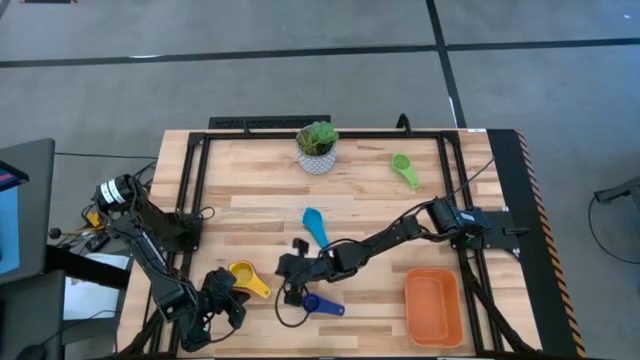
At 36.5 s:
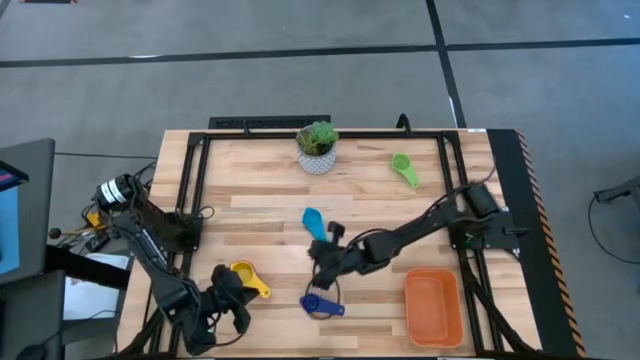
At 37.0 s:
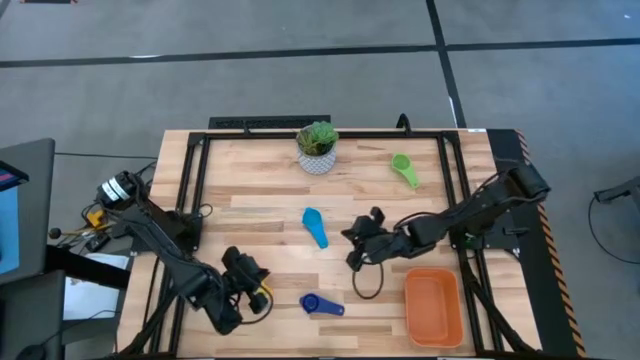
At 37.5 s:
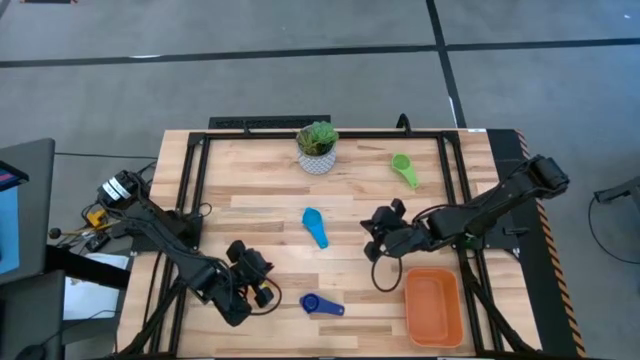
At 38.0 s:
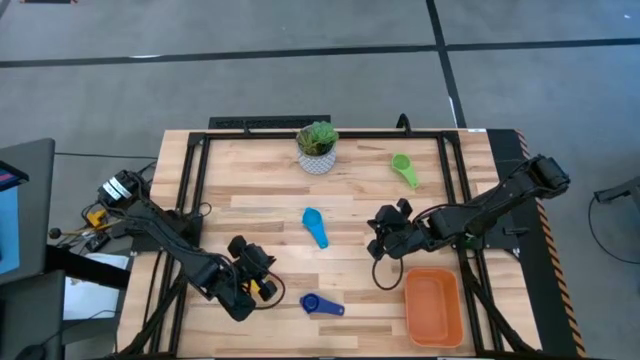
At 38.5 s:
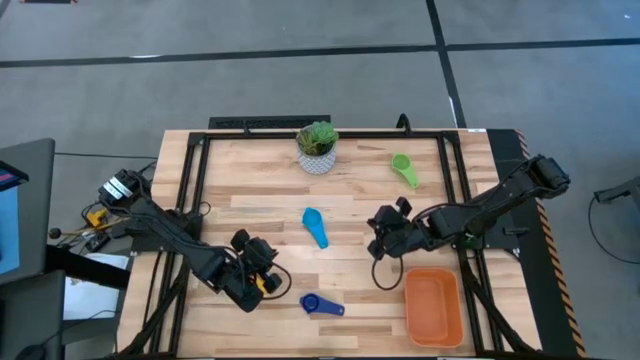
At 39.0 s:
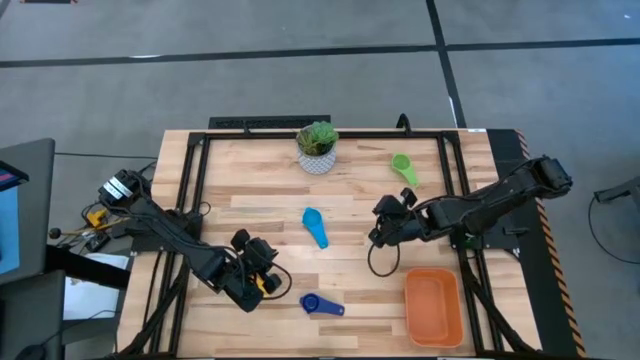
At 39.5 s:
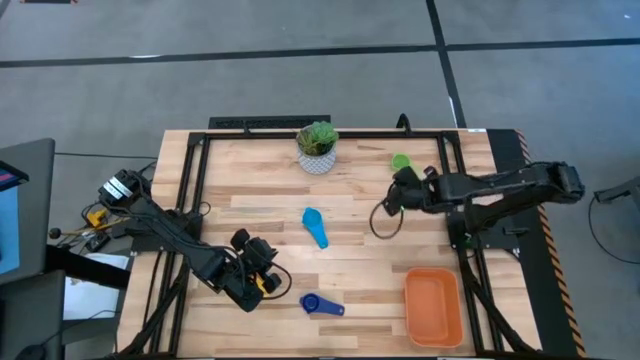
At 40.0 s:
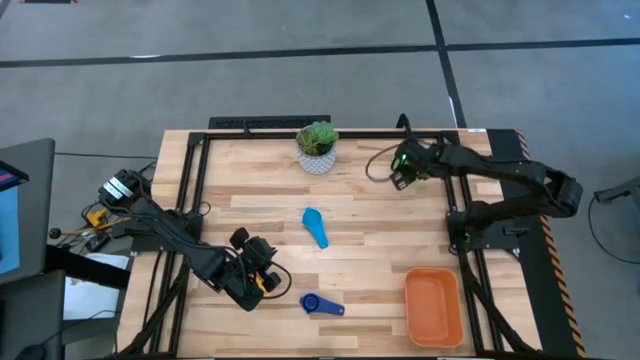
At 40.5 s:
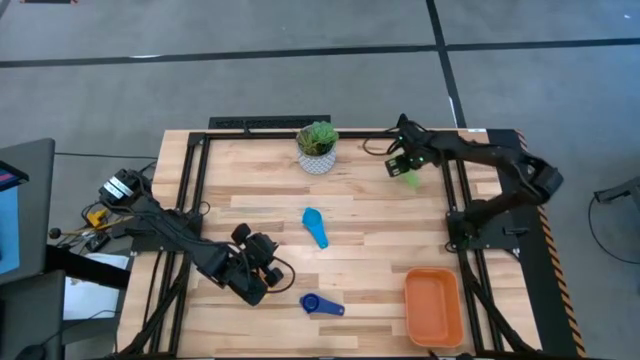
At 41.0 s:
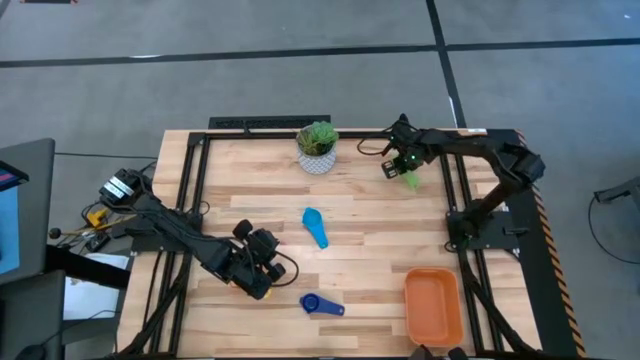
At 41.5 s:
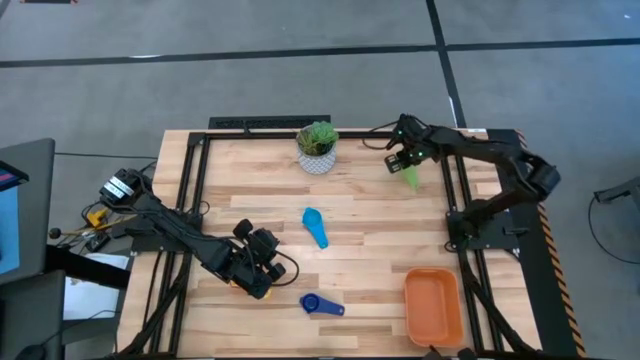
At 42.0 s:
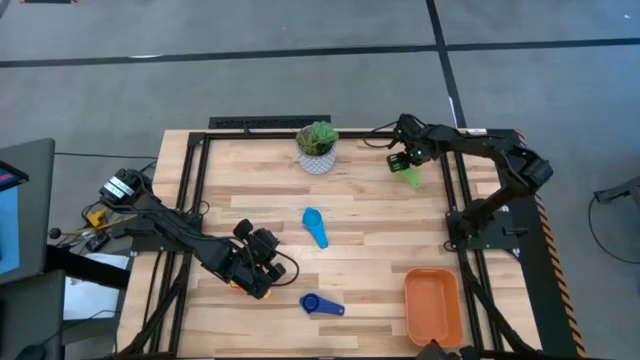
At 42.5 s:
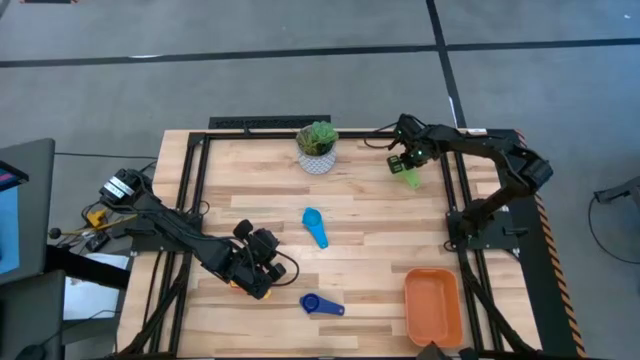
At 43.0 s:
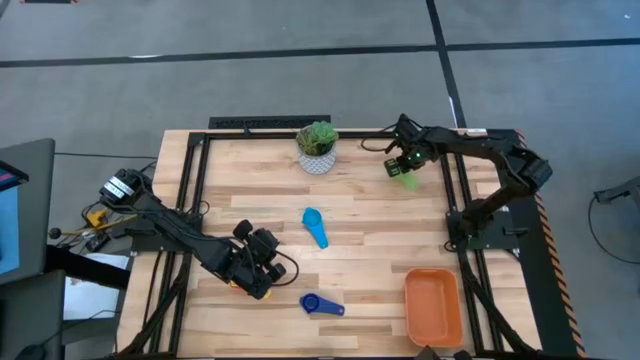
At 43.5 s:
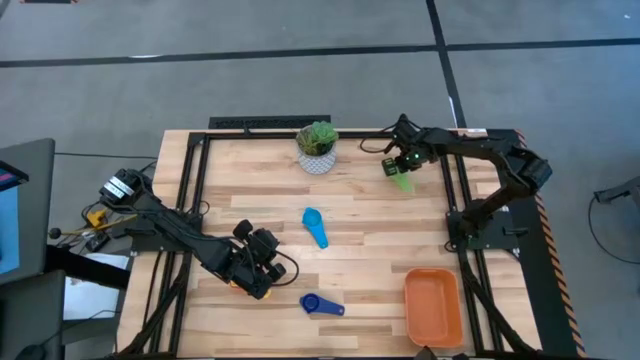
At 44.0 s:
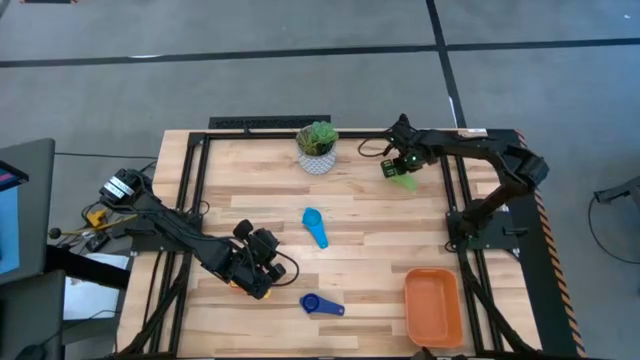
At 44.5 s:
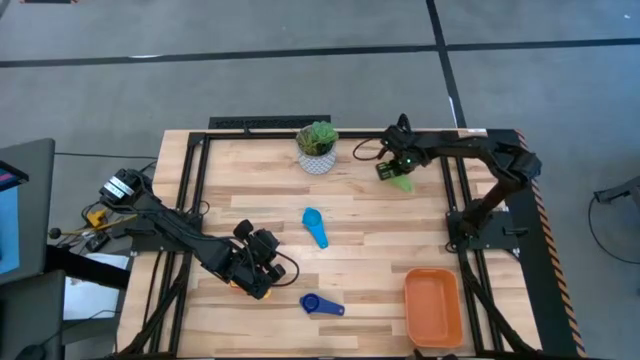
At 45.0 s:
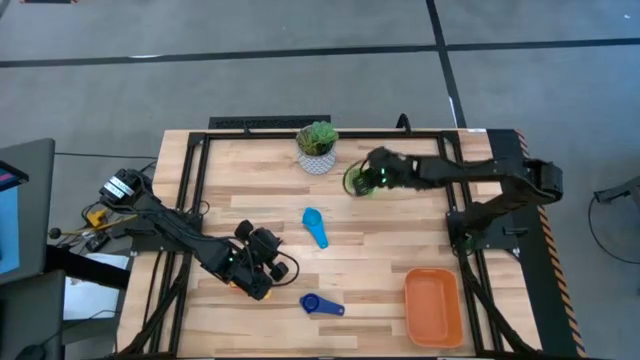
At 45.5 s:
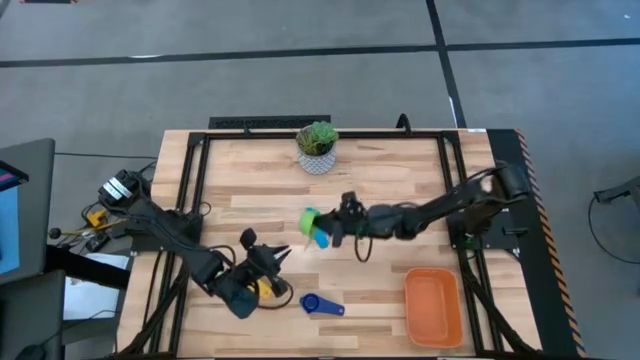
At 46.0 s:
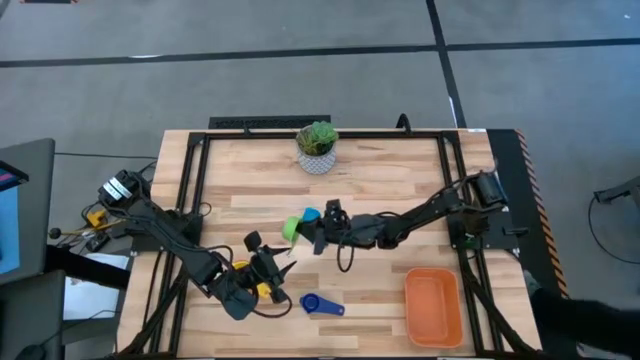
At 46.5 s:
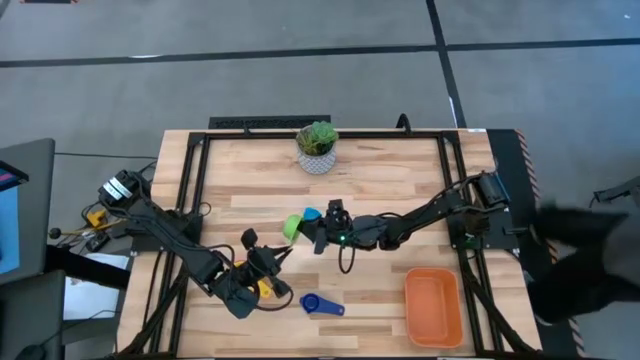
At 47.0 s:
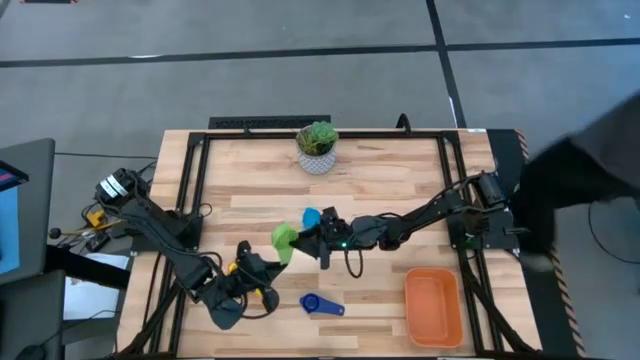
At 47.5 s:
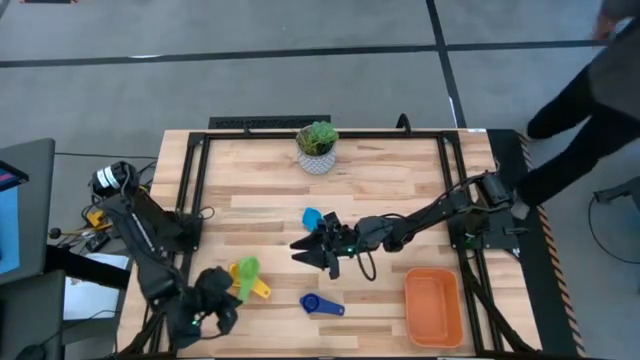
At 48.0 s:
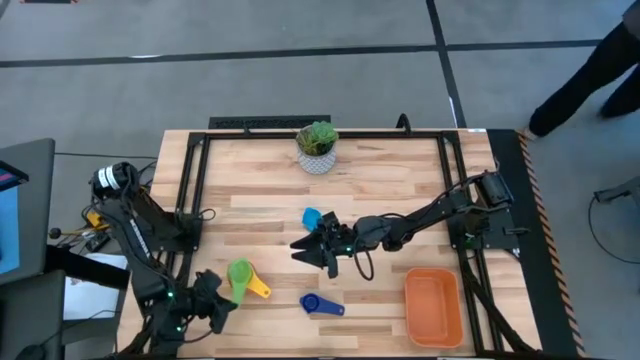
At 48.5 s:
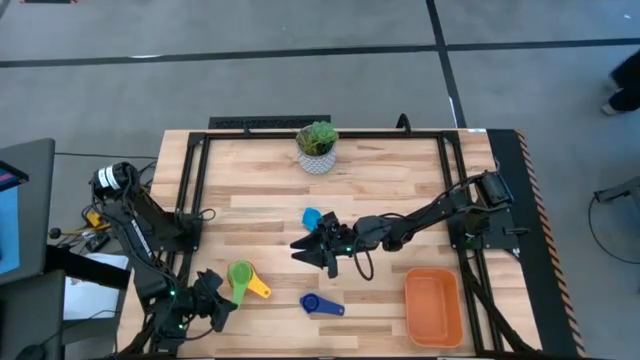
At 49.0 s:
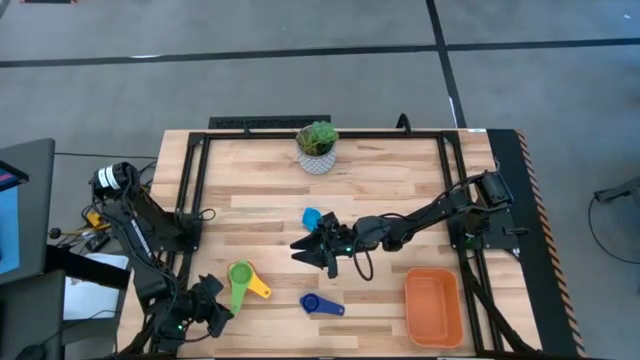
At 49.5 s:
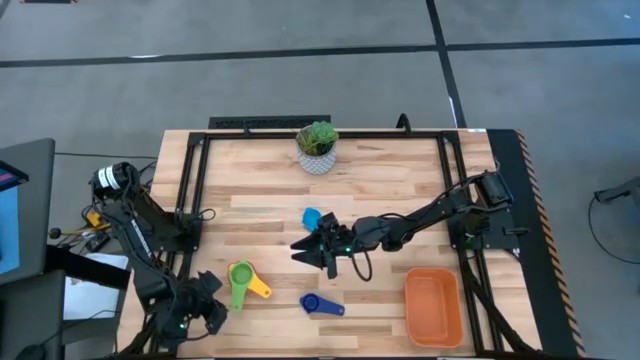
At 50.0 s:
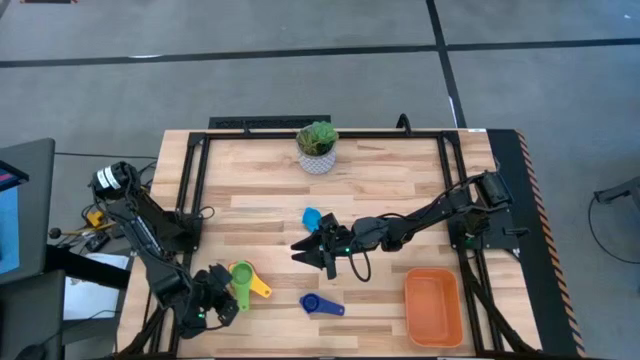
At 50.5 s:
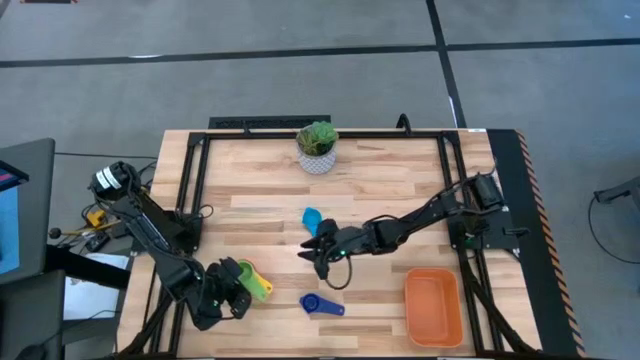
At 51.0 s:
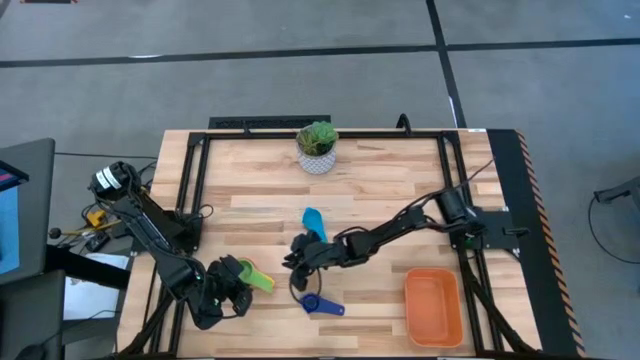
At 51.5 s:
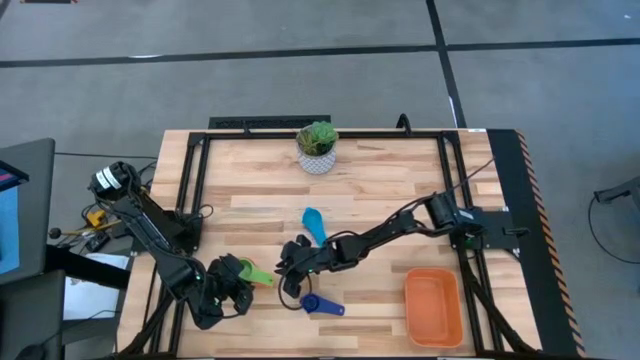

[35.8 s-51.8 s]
Task: Nest measuring cups in basket
Stack the green measuring cup on top of the yellow measuring cup

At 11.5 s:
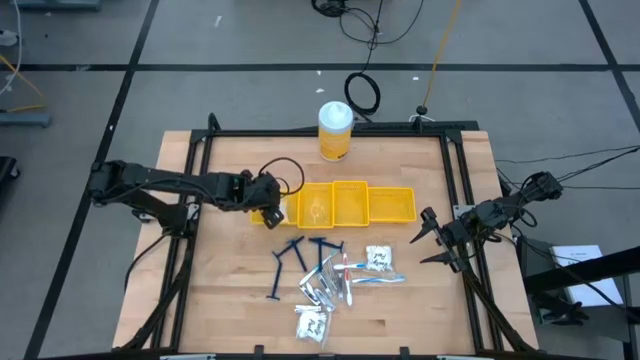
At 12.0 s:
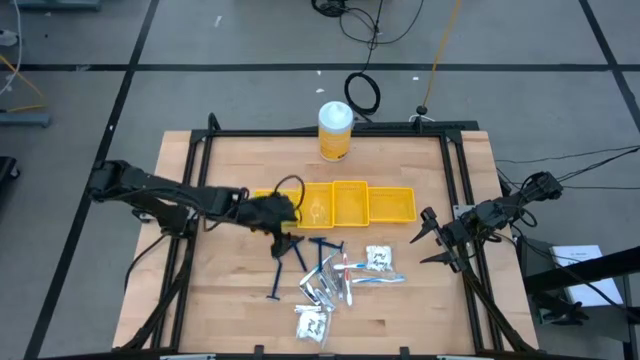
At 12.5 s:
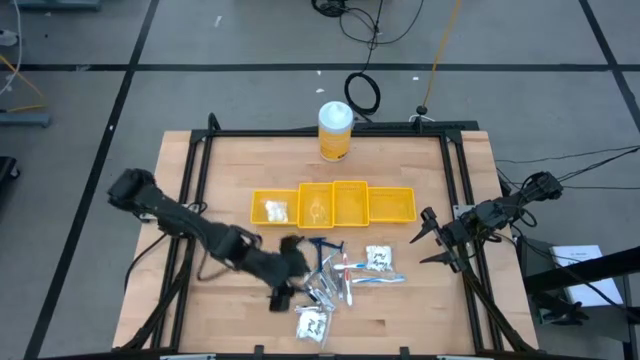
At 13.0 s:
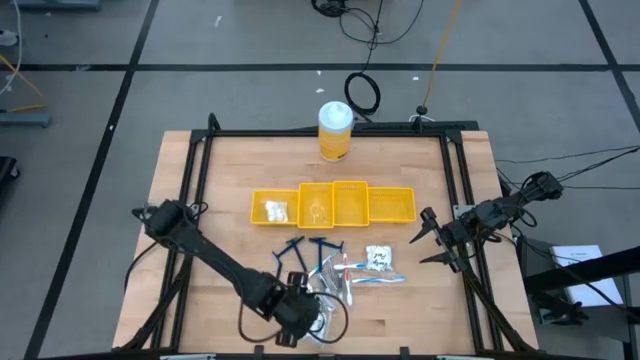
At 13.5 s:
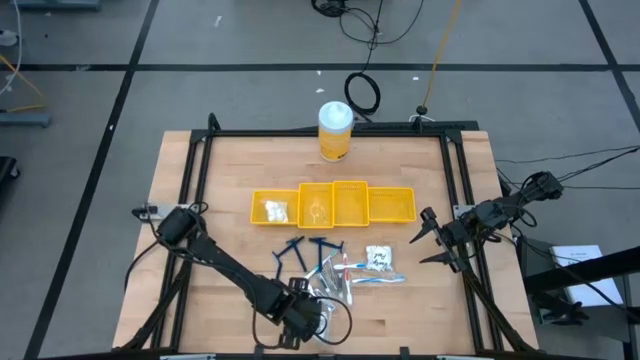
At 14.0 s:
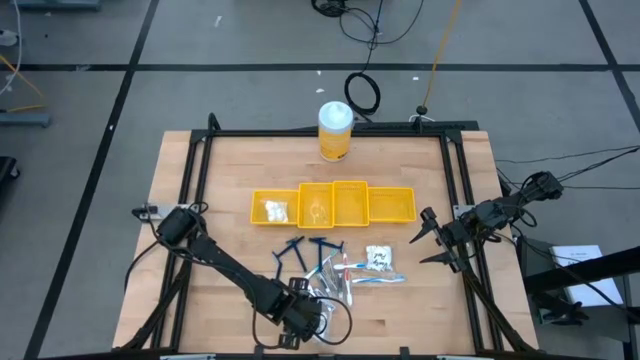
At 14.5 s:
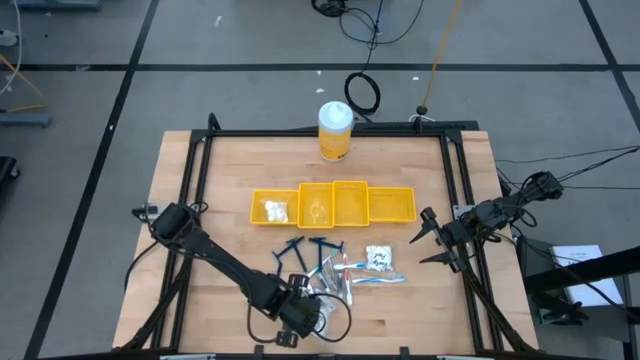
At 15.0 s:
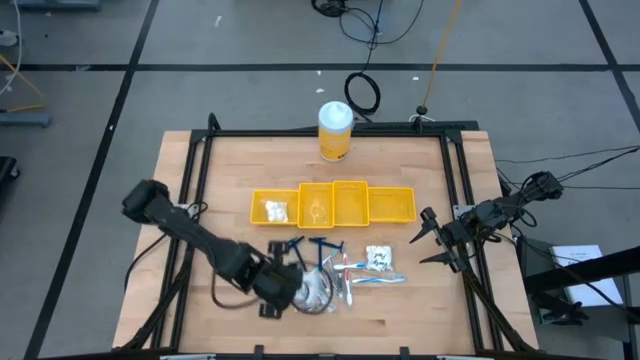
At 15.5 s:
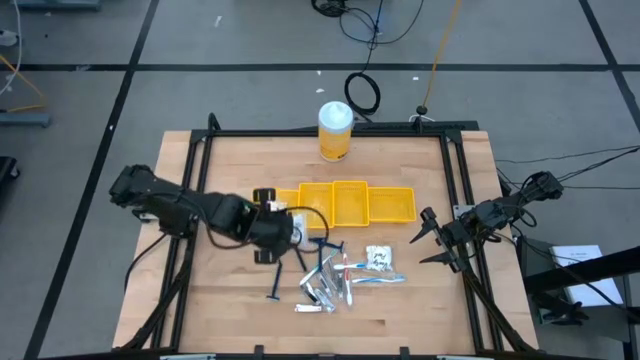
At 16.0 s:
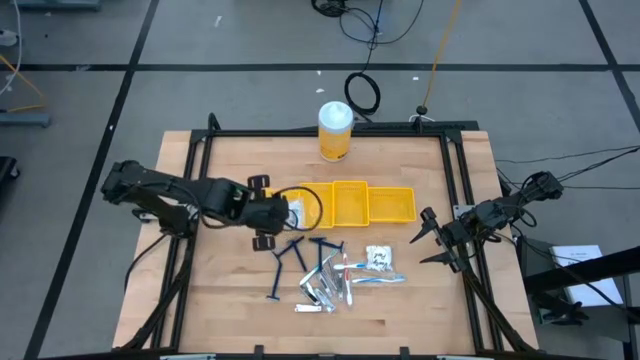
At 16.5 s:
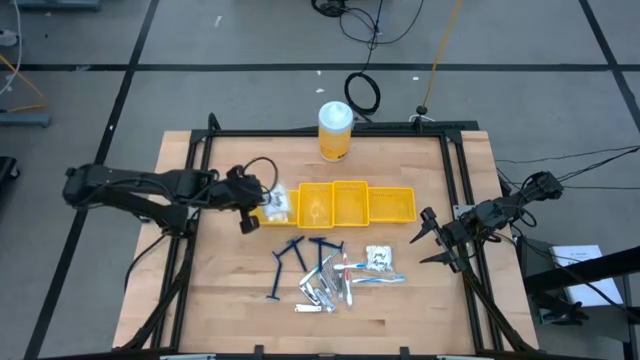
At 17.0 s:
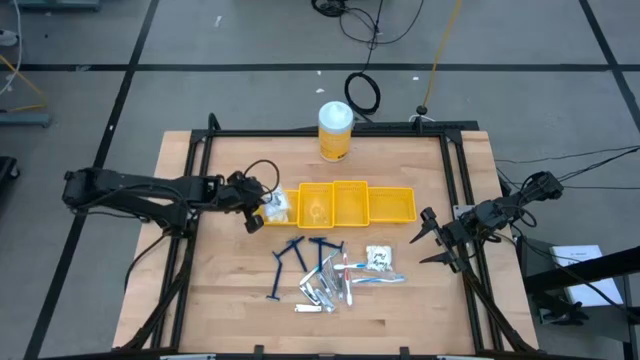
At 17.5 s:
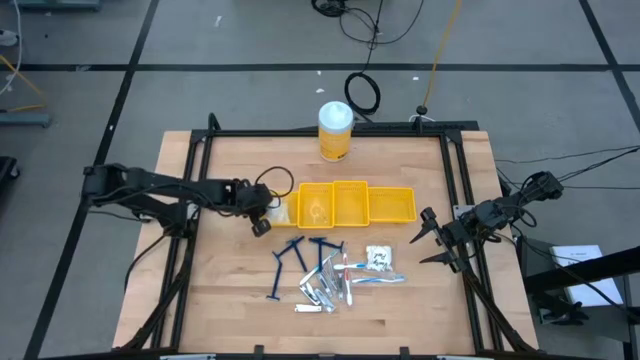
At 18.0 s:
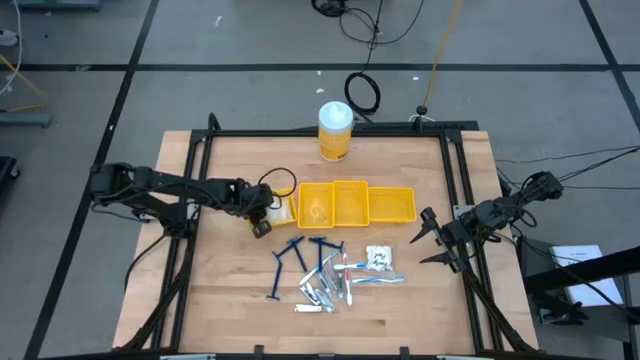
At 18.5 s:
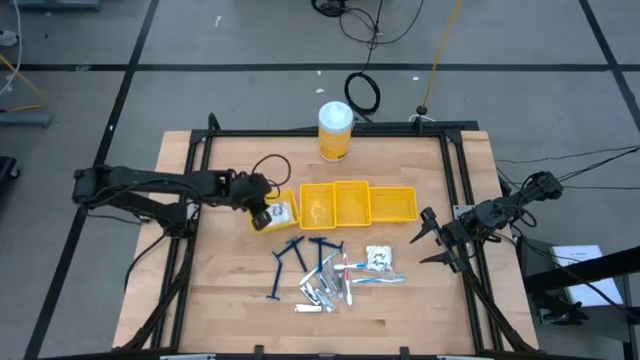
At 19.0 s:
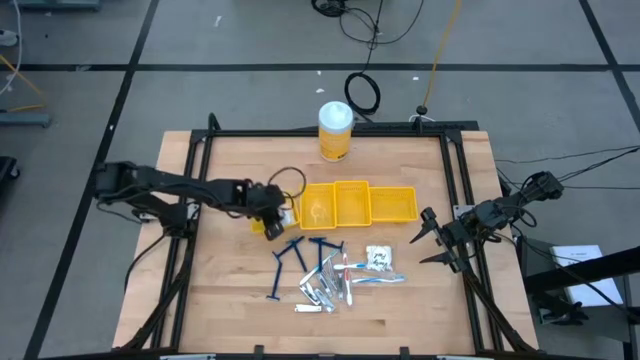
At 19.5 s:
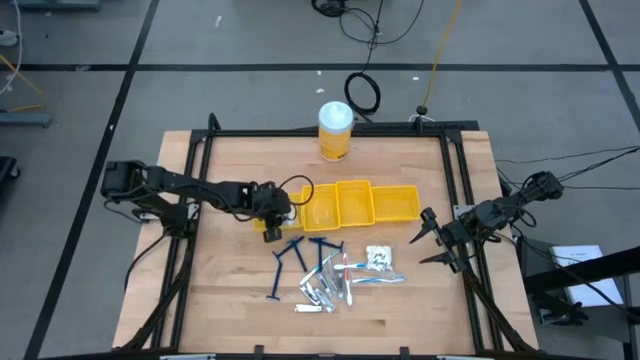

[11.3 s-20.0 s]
Task: Pick & Place Travel size toiletries
Put the bottom vanity pack into the left yellow bin
